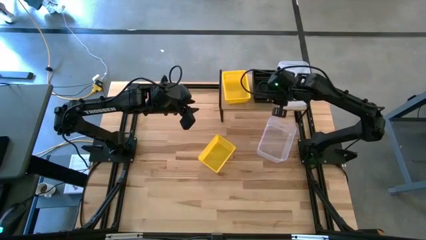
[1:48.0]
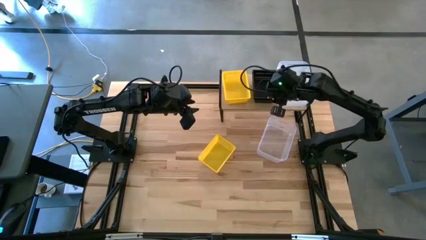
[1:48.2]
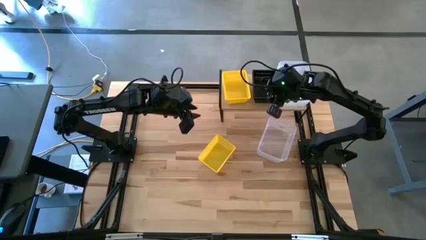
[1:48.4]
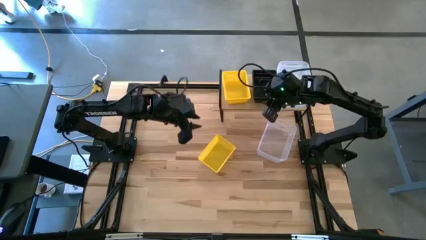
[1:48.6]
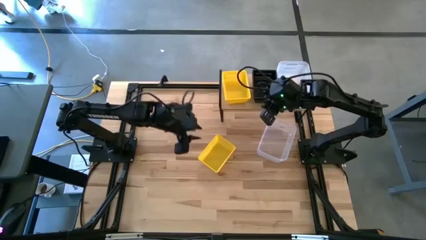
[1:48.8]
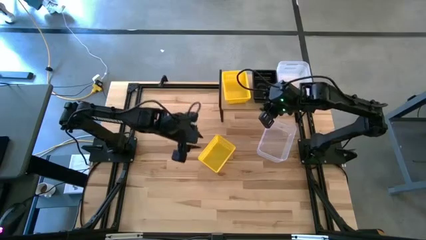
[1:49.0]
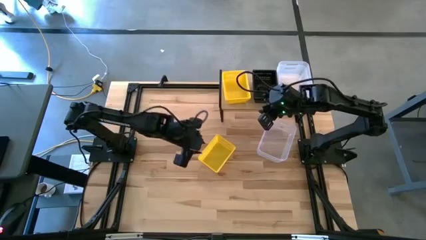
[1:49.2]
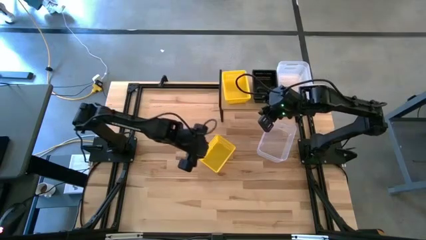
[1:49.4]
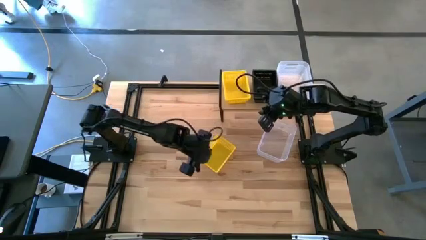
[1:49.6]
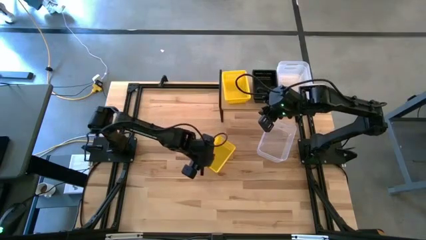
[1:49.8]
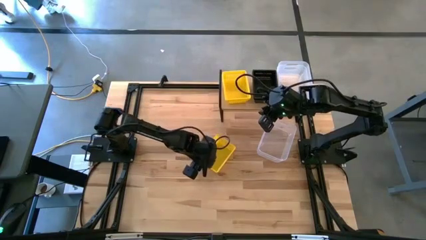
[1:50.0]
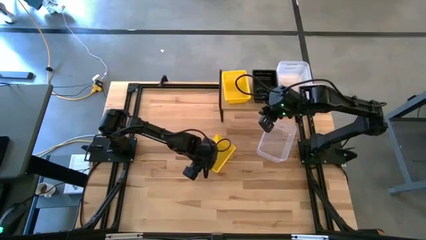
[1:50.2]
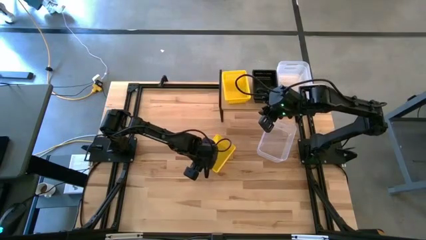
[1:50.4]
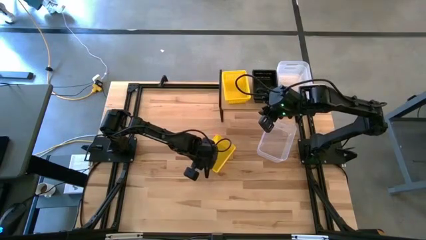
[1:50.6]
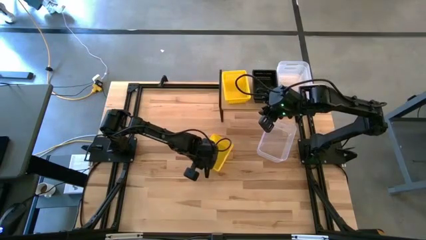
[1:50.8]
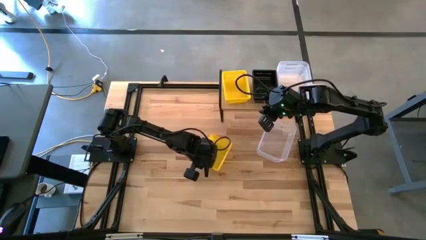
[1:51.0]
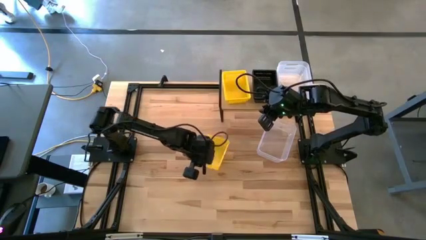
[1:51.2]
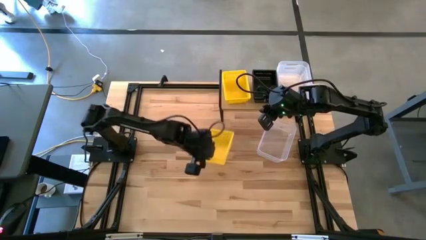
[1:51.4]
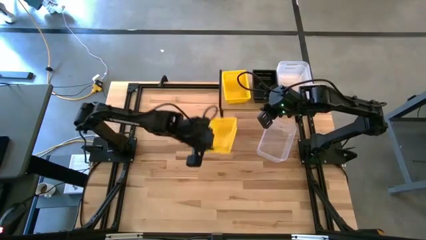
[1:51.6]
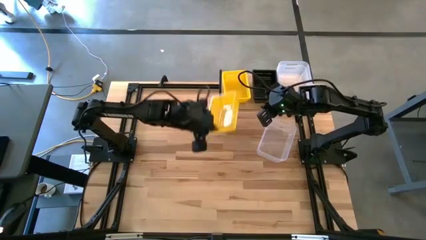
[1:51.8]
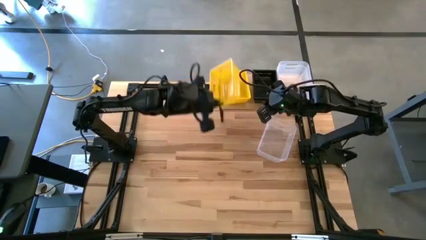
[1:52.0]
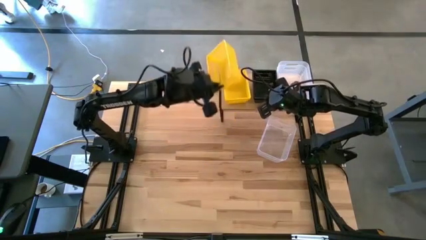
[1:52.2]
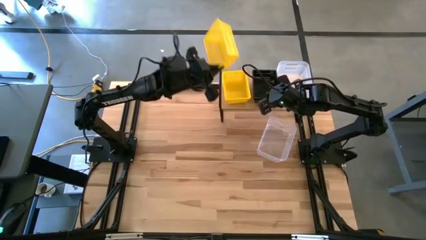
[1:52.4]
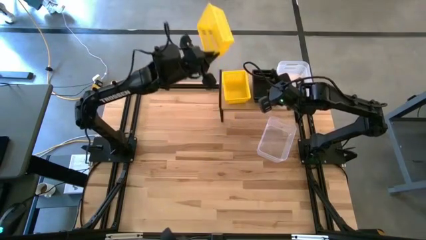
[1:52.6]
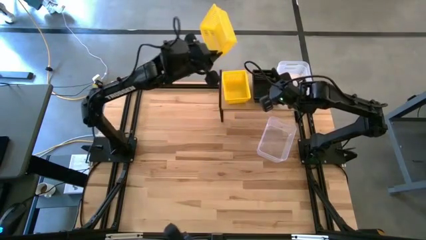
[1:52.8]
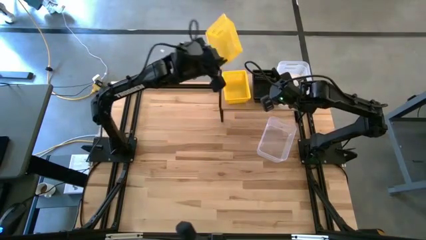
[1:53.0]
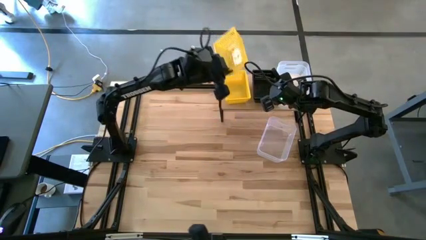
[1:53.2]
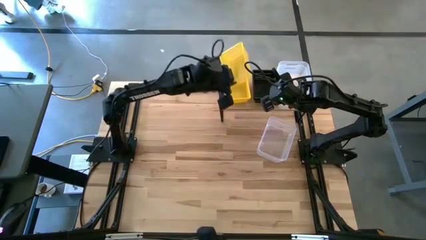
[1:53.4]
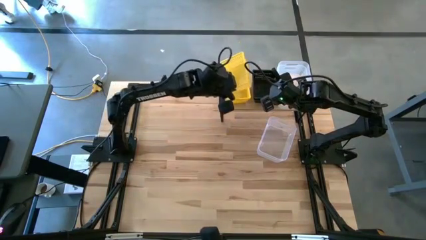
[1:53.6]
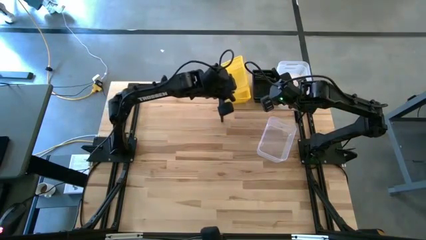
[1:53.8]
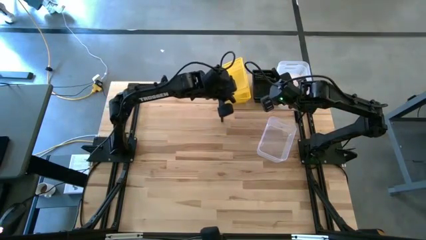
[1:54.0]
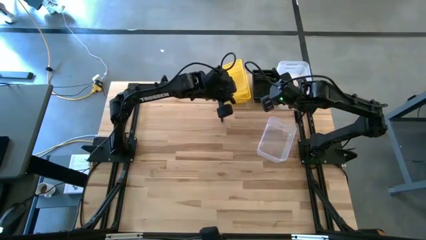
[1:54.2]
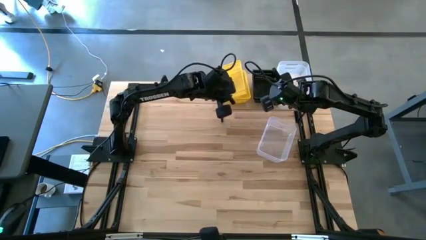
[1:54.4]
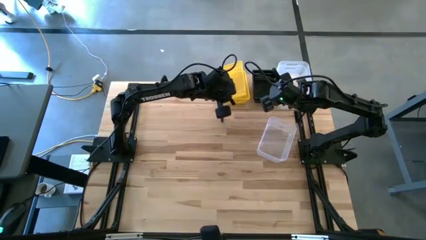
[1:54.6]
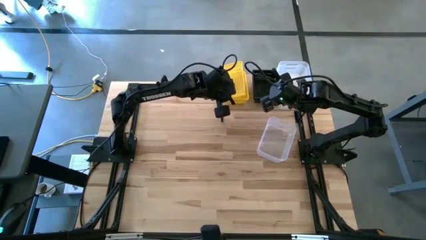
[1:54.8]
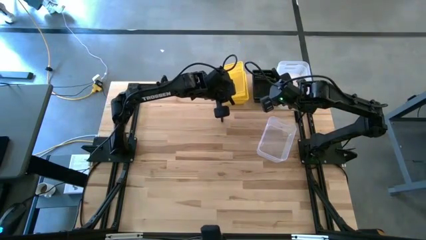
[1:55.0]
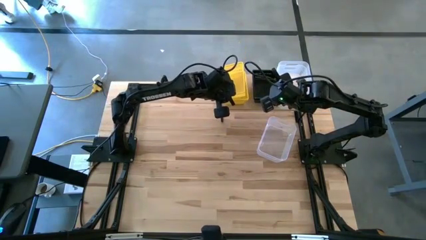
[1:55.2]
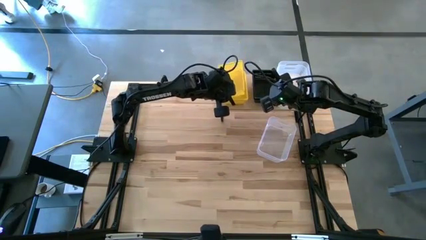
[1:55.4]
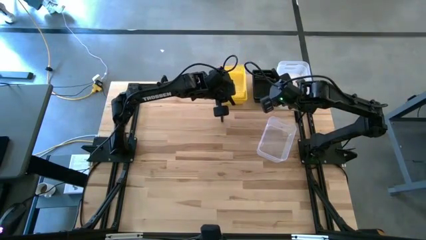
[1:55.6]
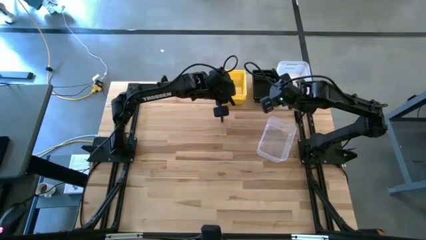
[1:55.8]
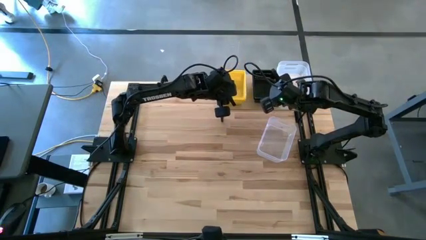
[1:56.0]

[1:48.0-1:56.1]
Task: Stack baskets on shelf by color
Stack the yellow bin on top of the other stacked yellow bins on the shelf
